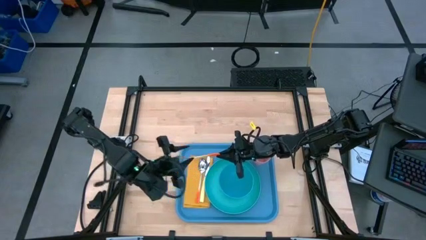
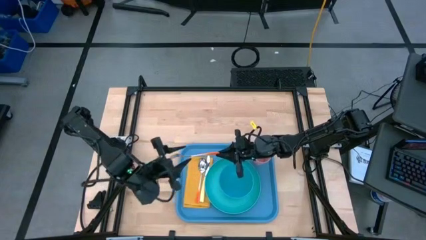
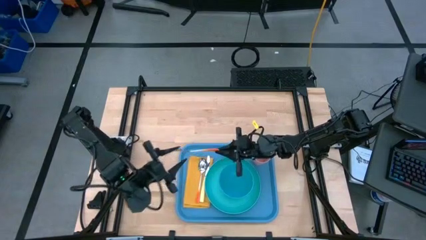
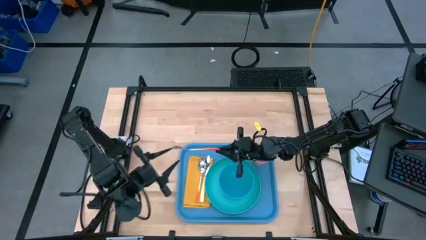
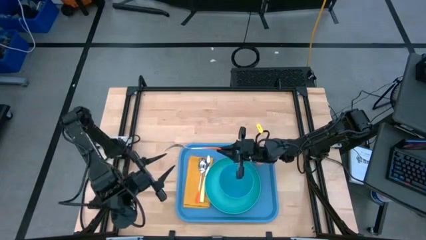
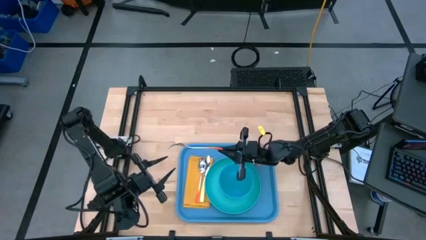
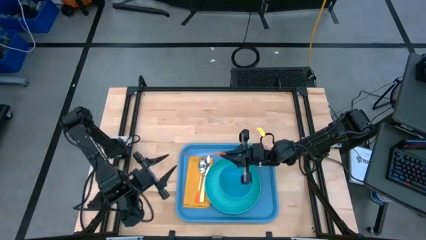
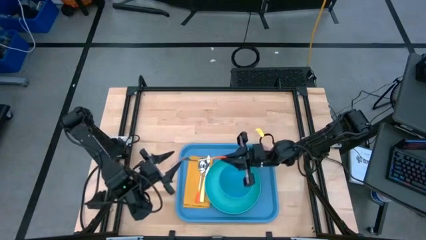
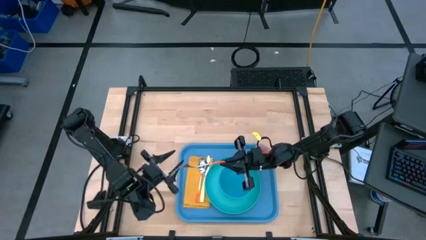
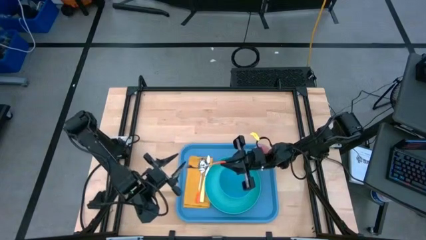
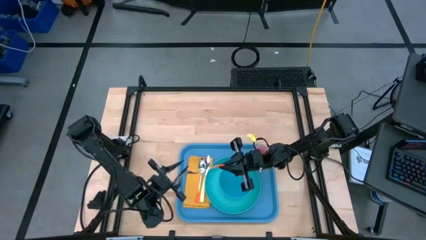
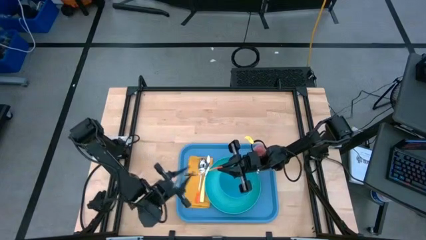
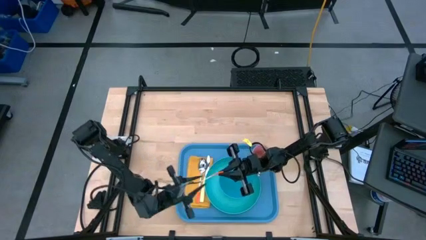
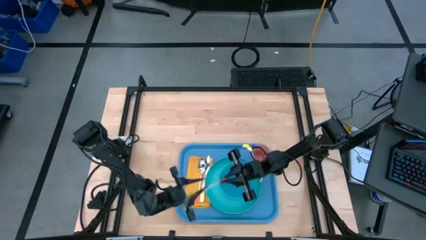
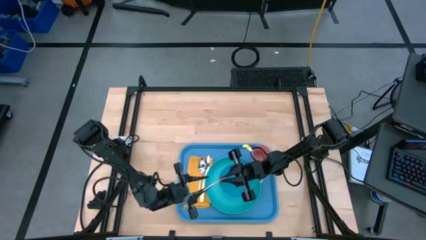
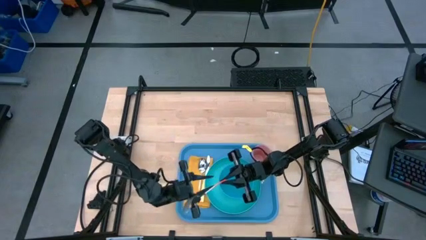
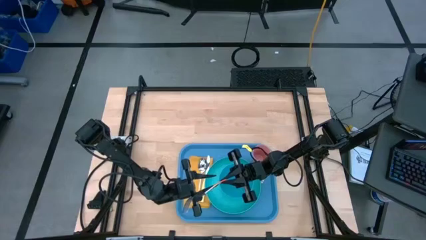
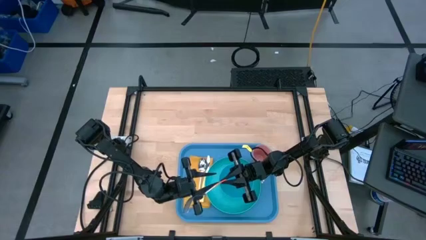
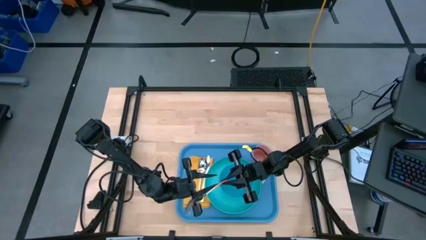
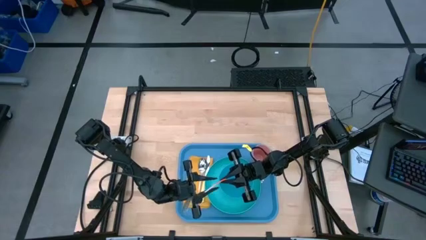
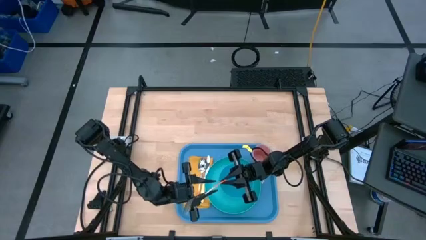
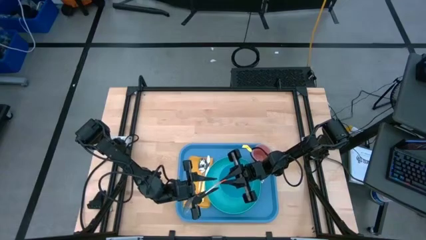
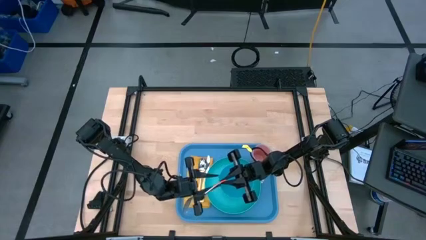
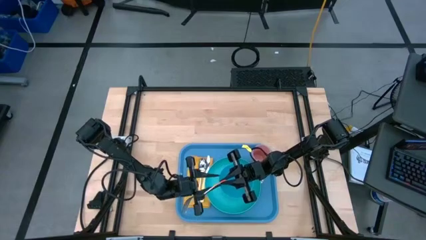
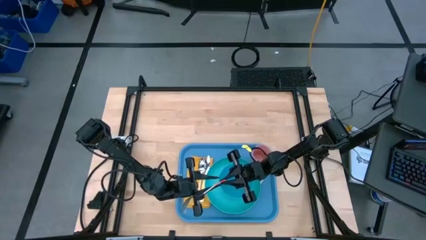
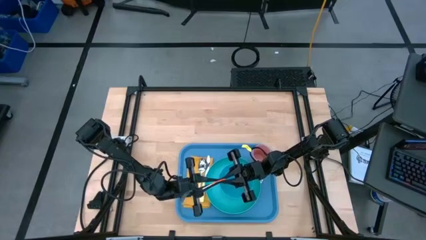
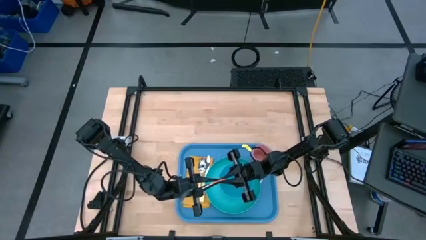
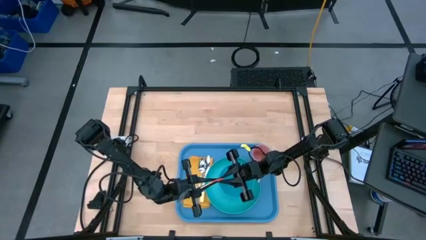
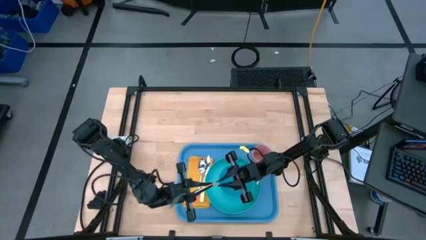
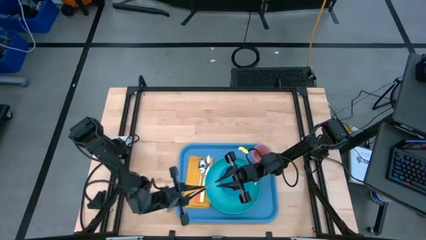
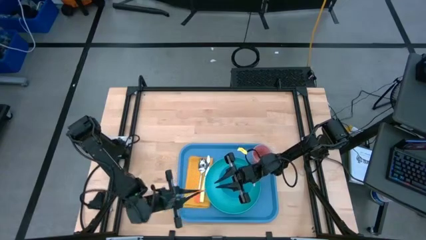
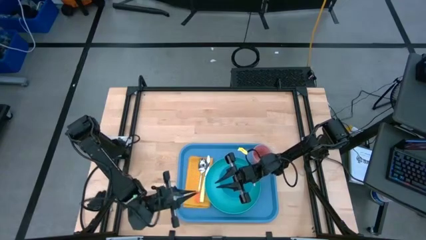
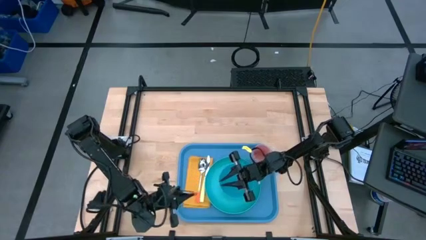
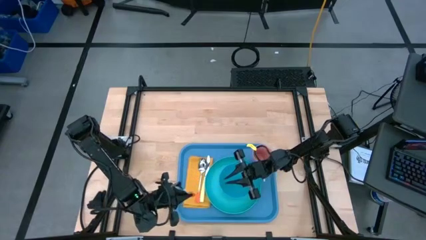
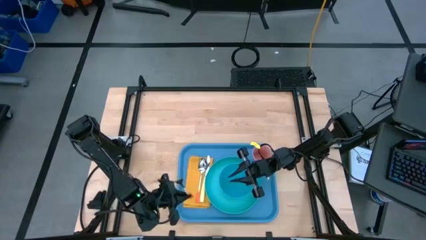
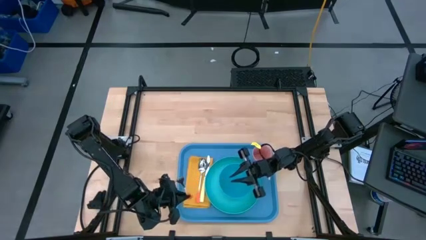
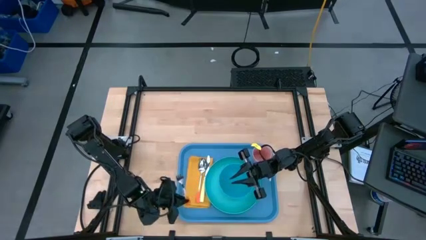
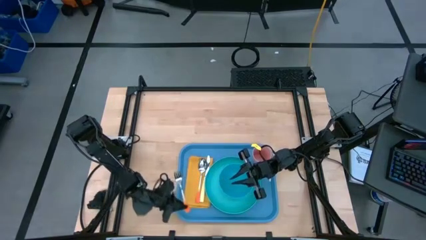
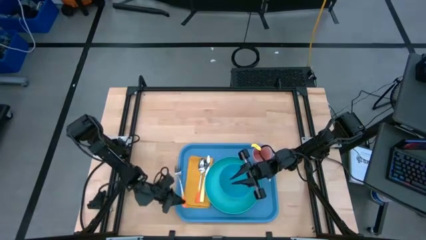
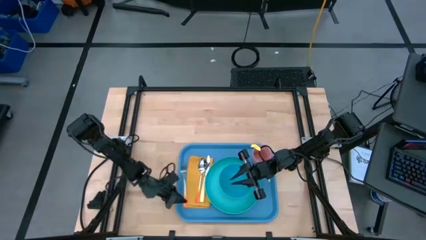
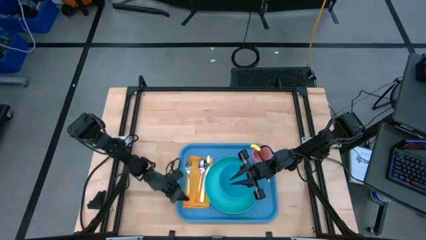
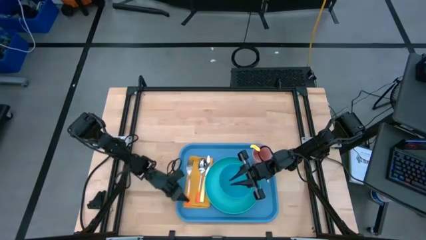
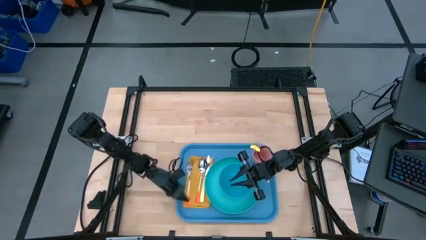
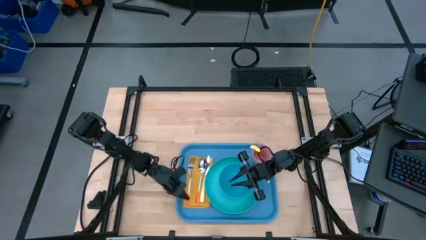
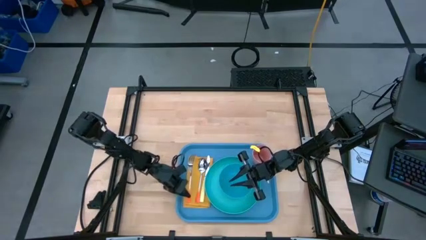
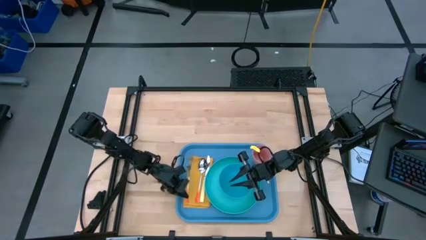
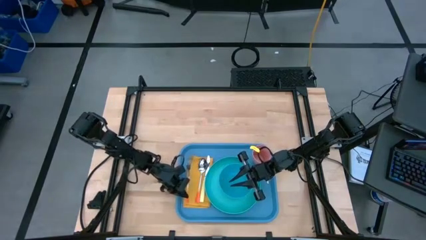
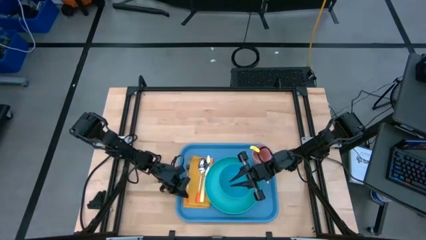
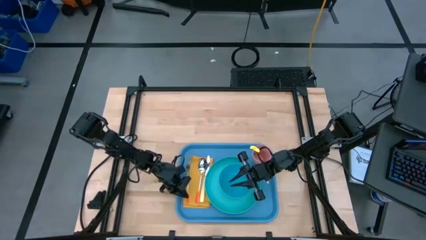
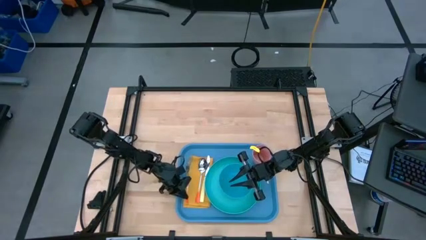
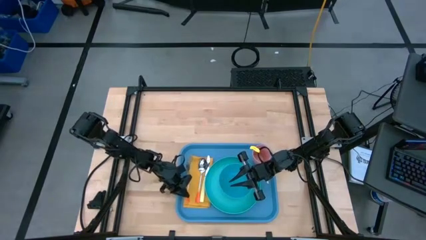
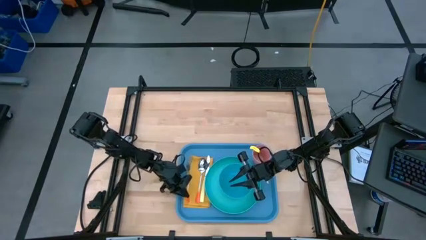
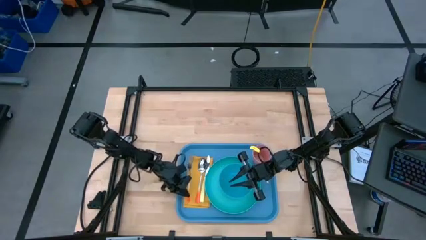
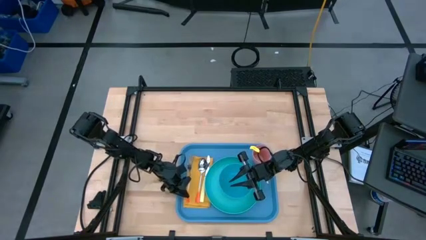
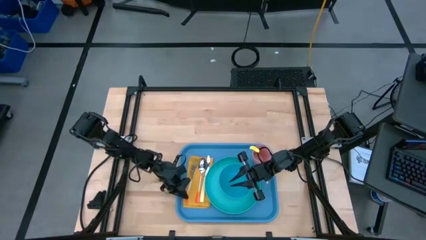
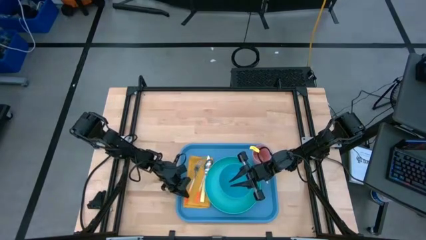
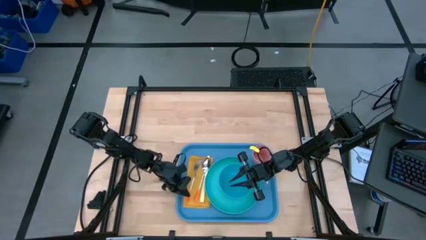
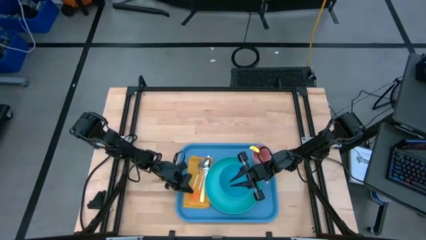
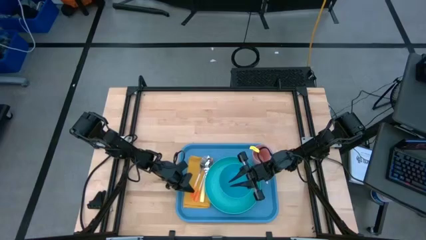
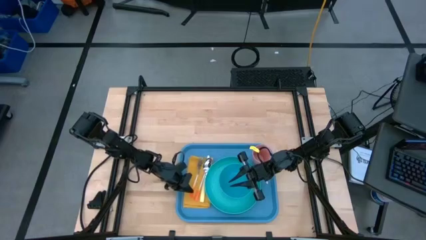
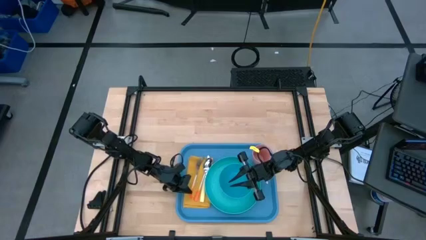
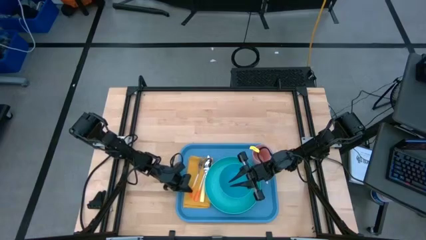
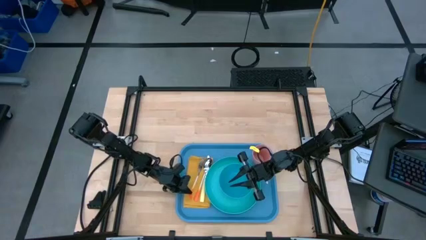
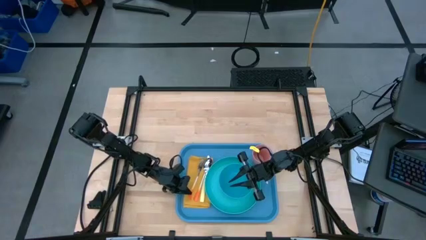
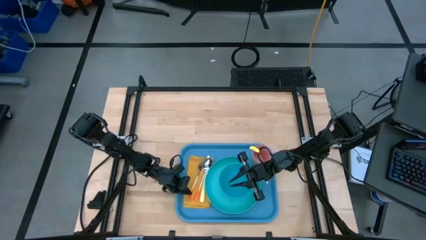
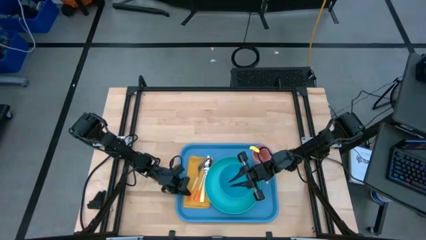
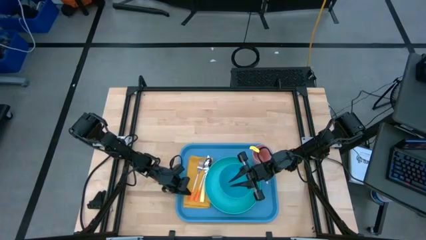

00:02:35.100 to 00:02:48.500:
Task: Set up tray
Put the orange fork on top of the yellow napkin to the left of the orange spoon

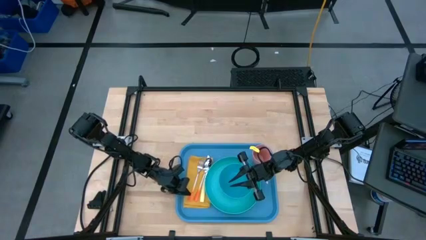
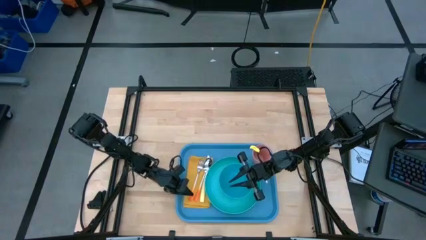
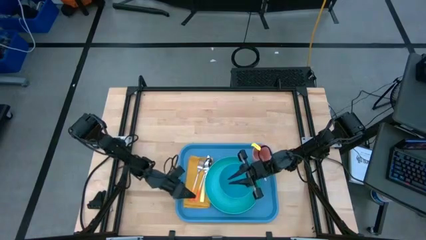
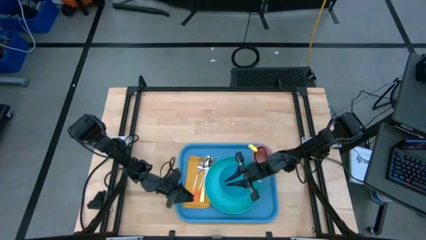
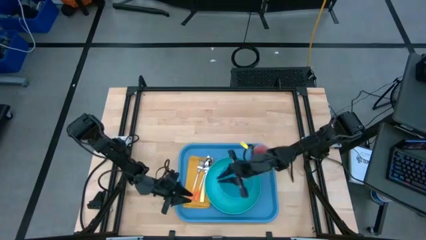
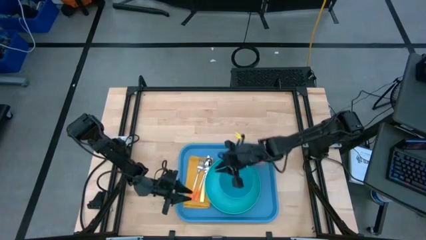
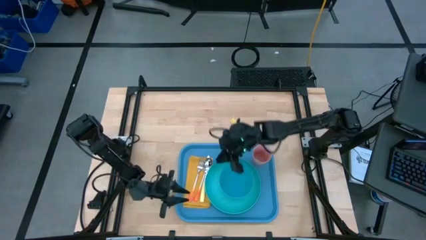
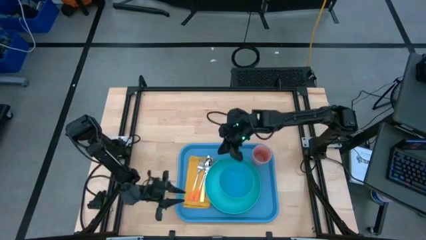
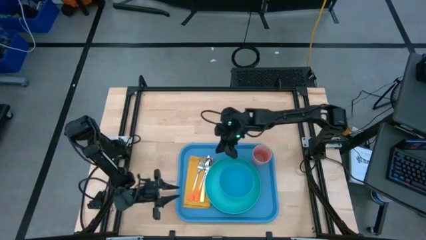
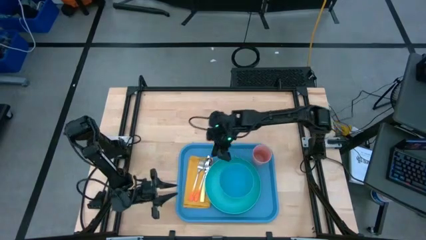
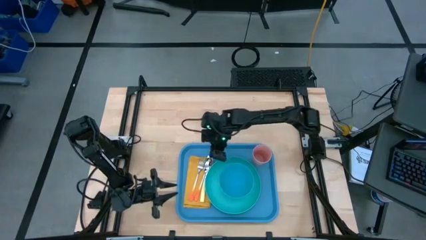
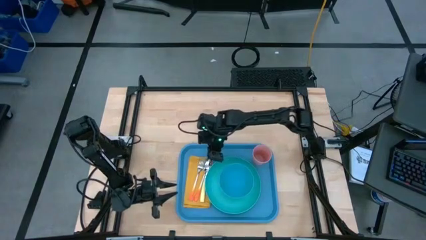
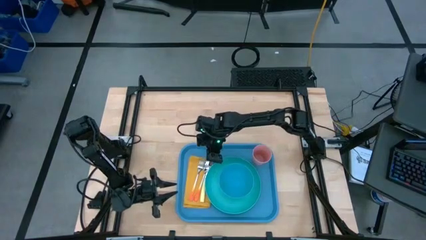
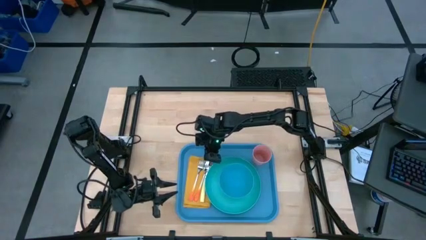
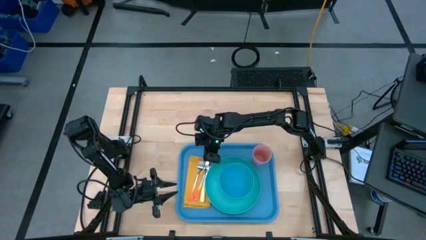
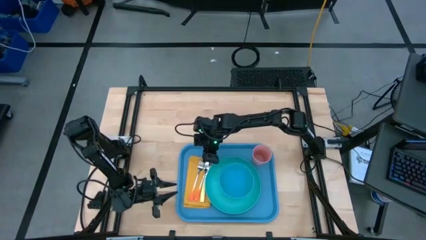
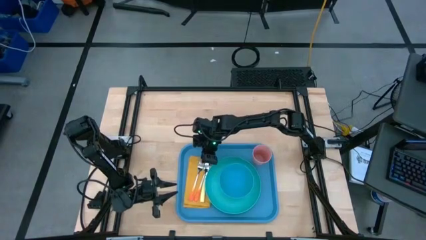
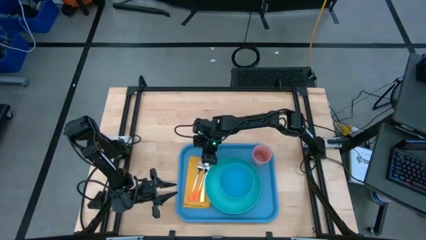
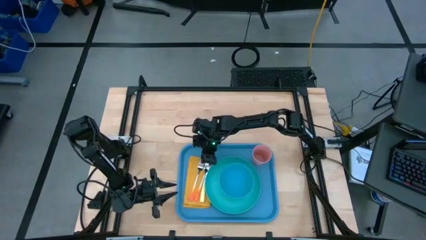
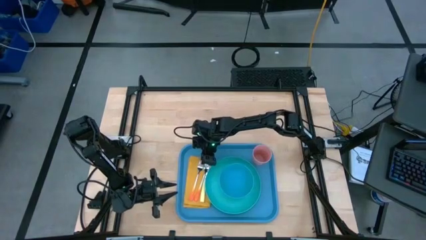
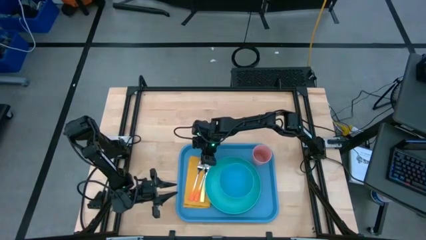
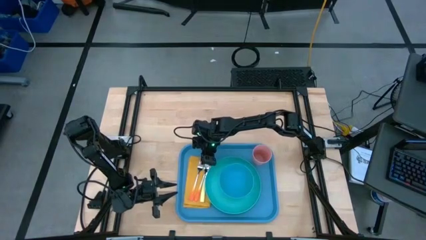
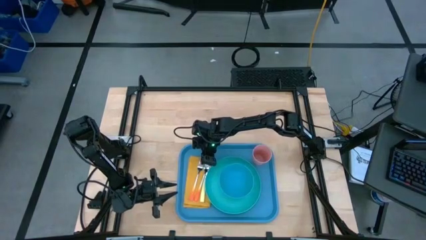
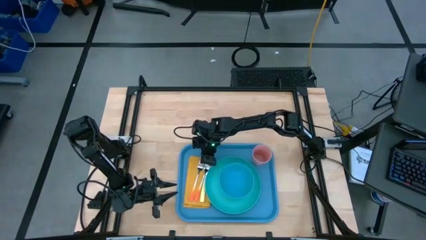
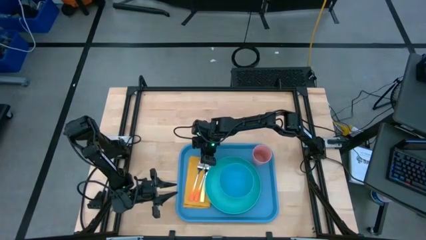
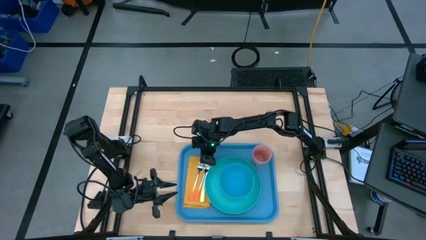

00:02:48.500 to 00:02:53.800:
Put the orange fork on top of the yellow napkin to the left of the orange spoon
